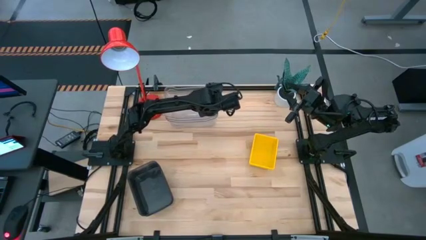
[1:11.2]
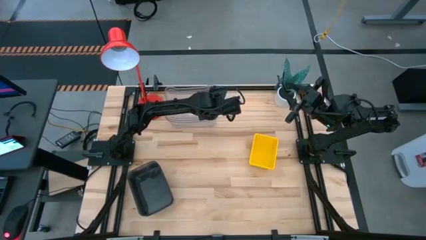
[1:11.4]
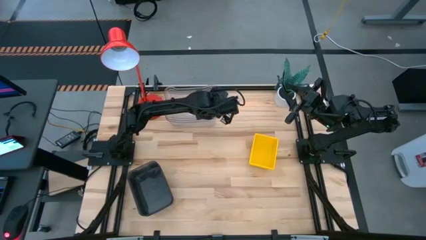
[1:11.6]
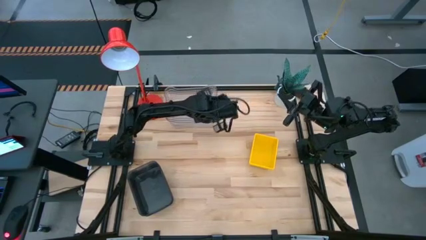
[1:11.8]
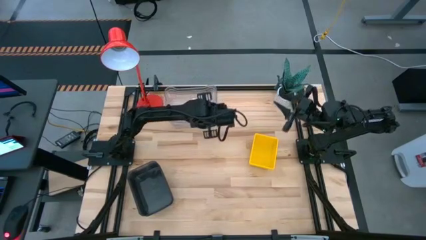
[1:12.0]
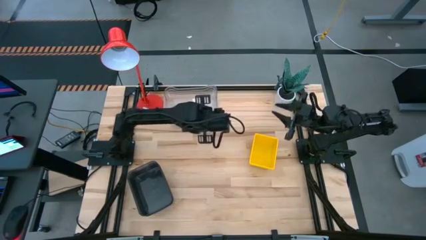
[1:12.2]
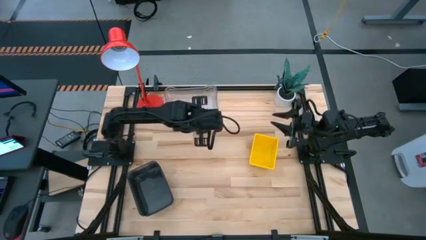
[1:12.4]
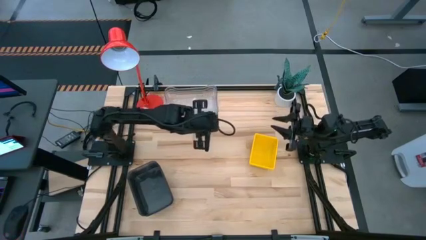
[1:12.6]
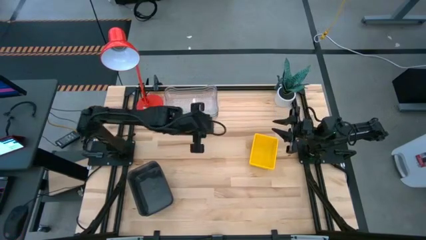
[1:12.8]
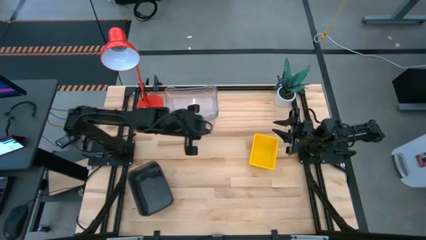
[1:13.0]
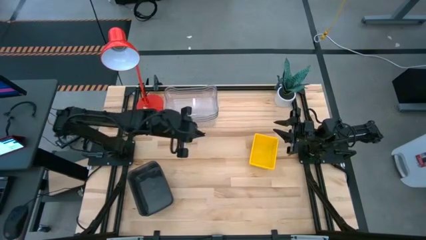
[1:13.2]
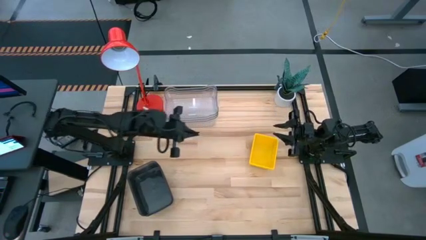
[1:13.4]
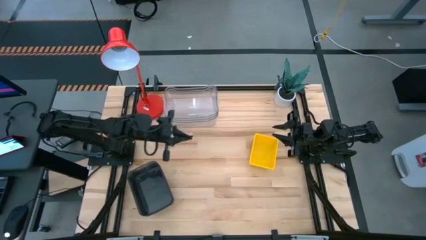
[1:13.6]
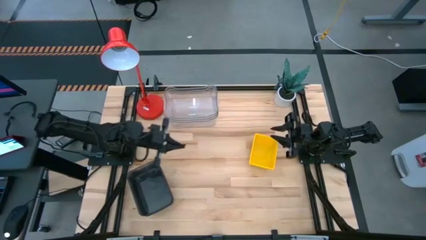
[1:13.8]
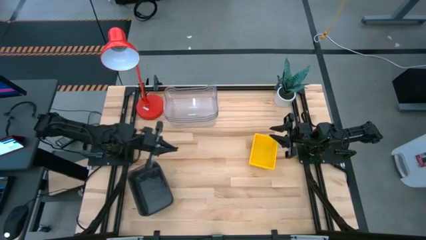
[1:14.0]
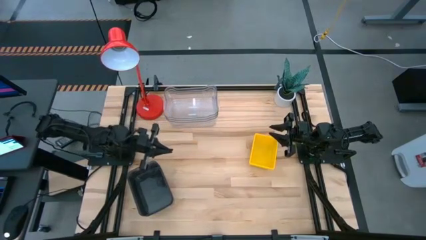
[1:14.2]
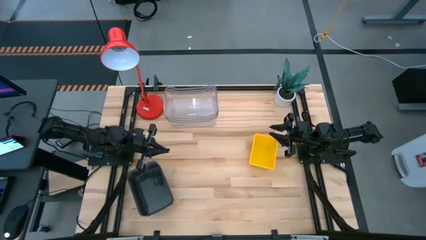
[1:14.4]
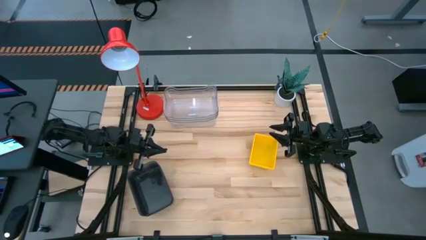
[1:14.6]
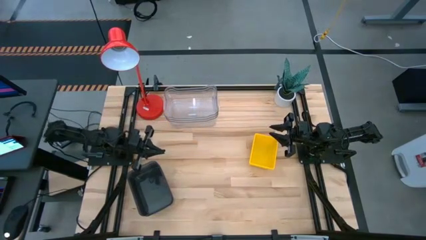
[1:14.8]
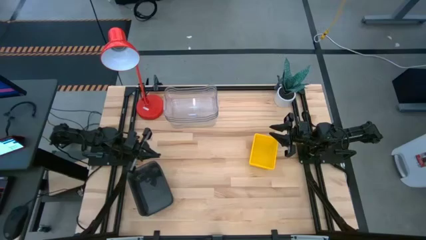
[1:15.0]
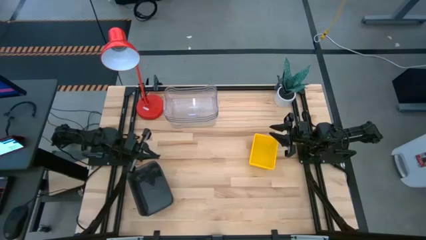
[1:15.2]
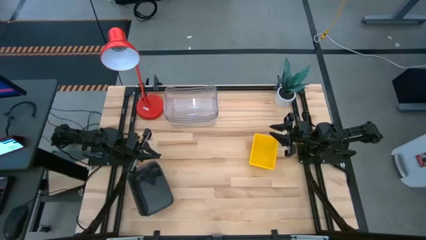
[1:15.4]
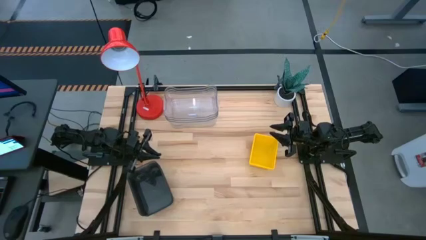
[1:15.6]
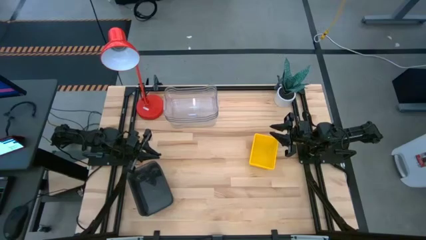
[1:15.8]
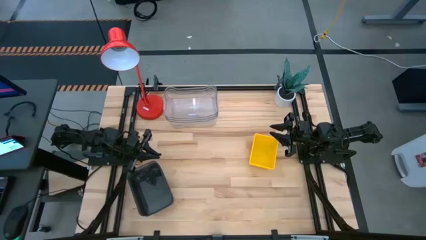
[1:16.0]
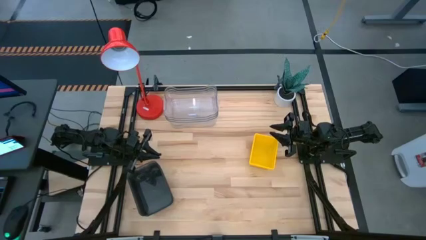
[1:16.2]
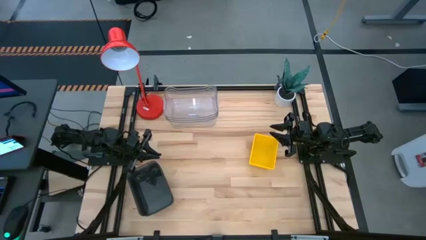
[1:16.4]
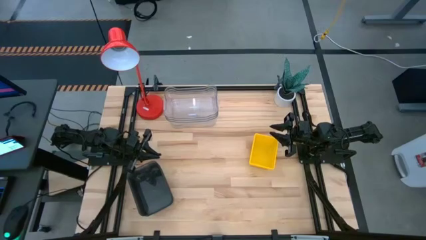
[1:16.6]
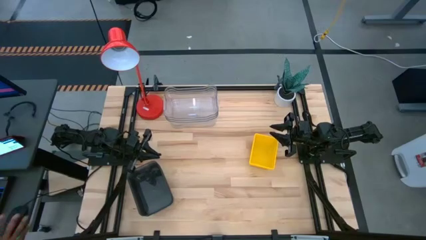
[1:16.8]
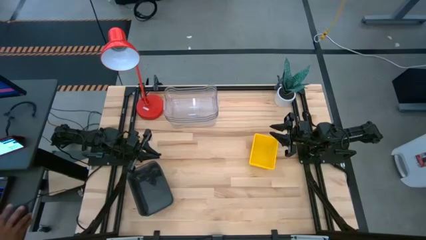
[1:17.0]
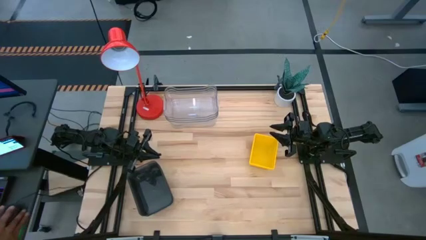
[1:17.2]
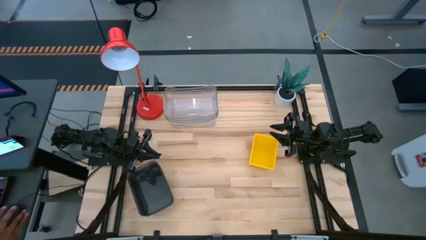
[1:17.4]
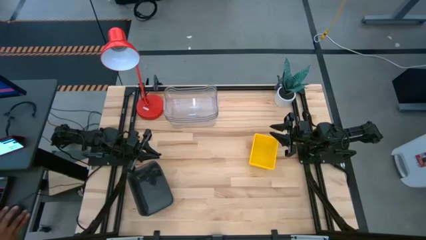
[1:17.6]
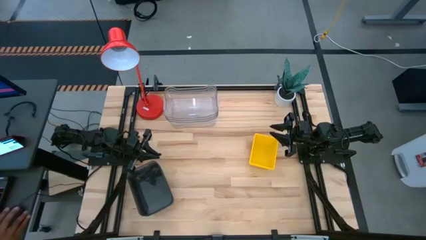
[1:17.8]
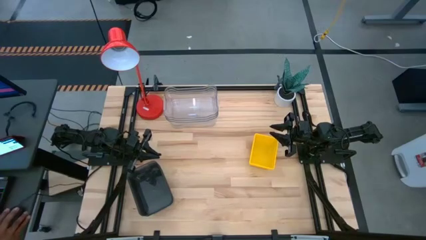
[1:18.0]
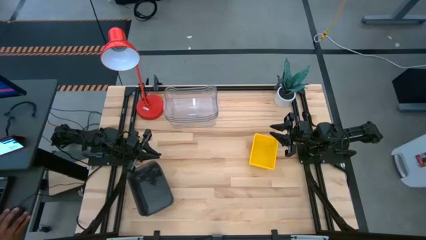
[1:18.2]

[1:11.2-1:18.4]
Return to Home Position

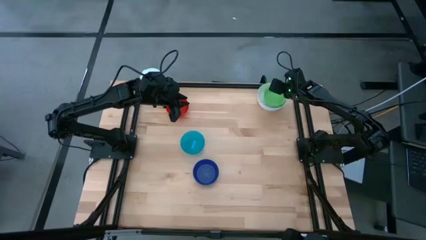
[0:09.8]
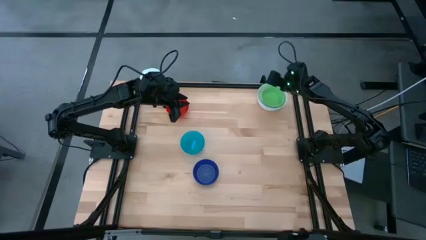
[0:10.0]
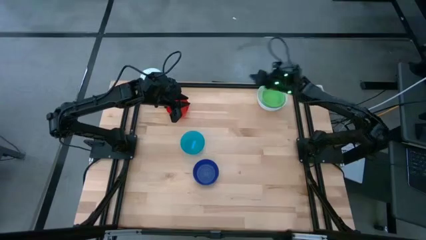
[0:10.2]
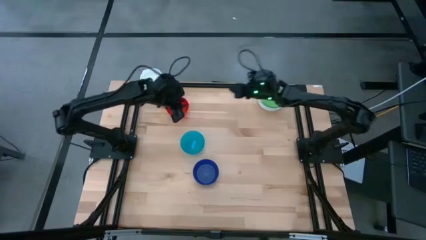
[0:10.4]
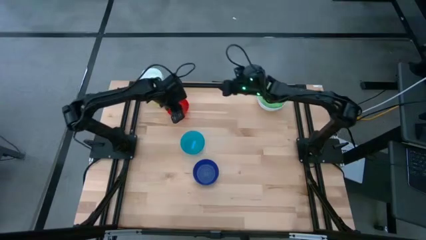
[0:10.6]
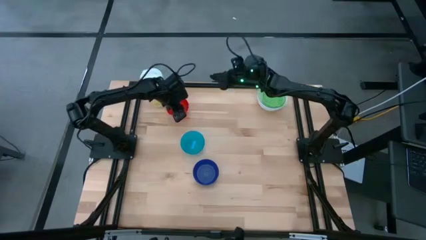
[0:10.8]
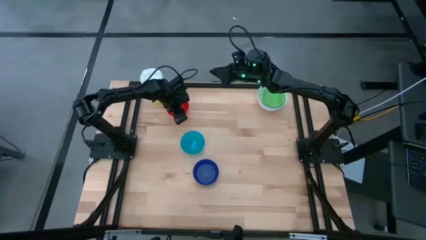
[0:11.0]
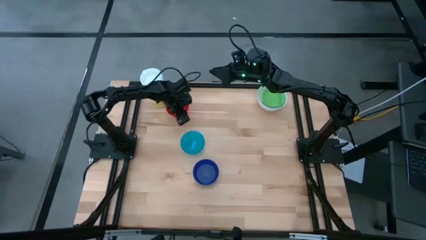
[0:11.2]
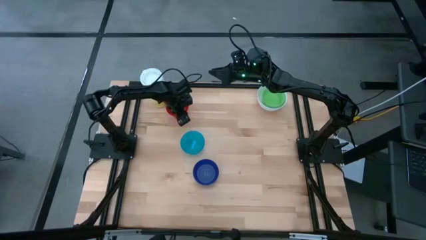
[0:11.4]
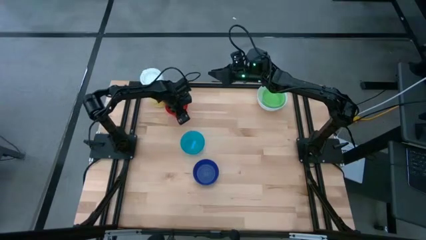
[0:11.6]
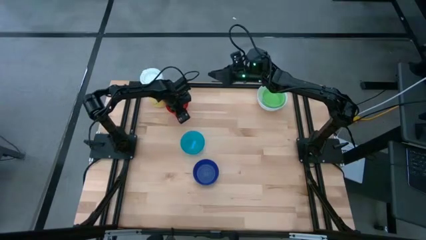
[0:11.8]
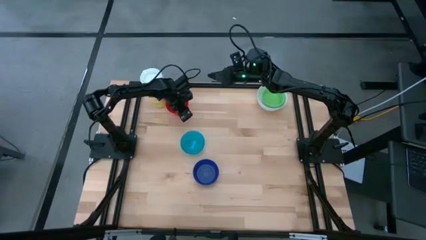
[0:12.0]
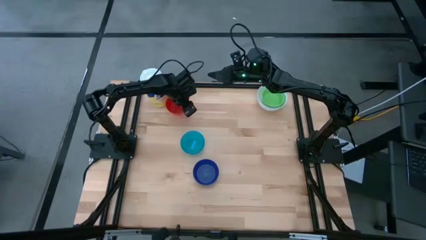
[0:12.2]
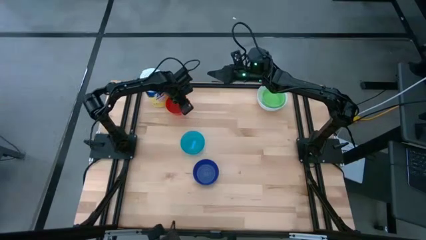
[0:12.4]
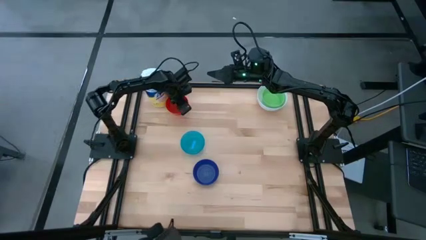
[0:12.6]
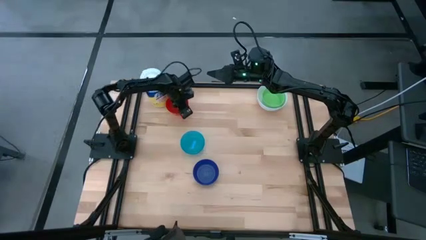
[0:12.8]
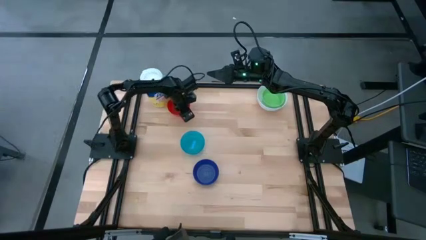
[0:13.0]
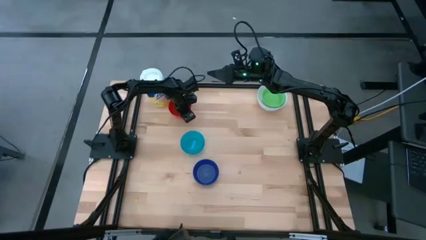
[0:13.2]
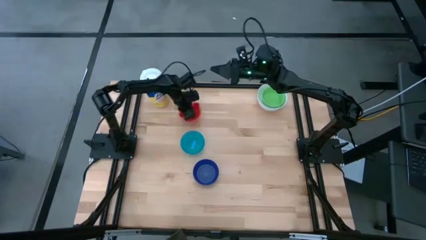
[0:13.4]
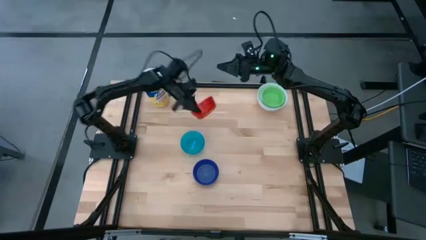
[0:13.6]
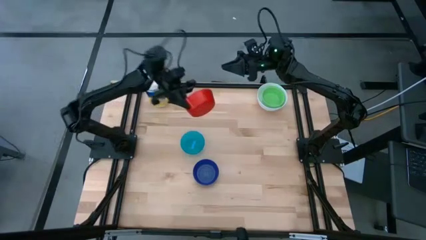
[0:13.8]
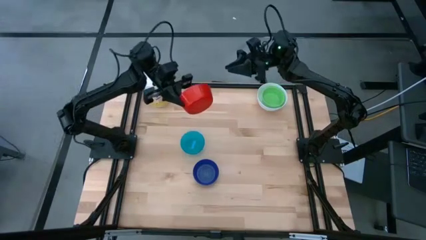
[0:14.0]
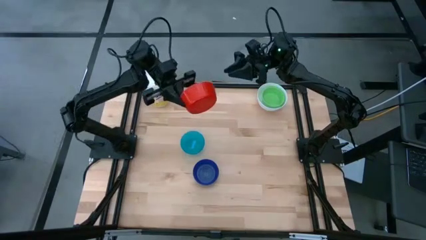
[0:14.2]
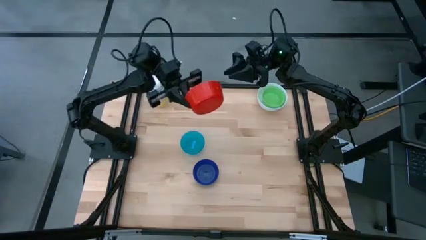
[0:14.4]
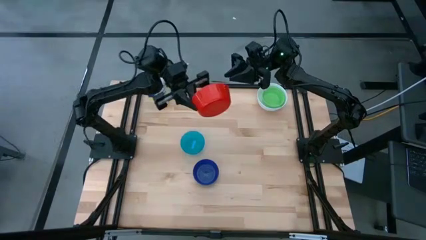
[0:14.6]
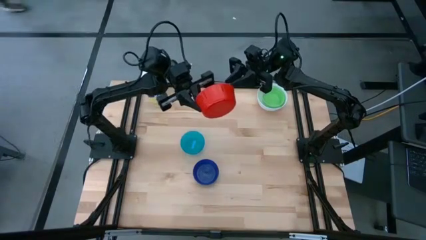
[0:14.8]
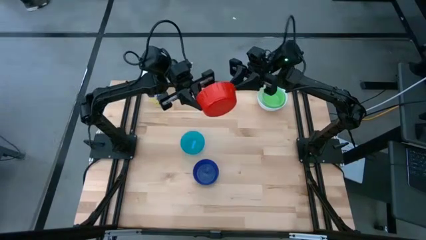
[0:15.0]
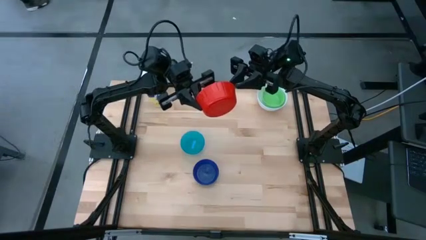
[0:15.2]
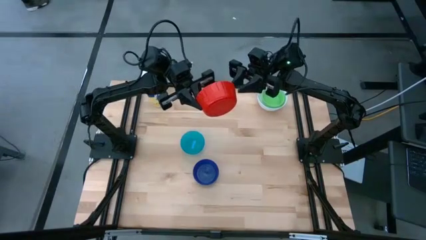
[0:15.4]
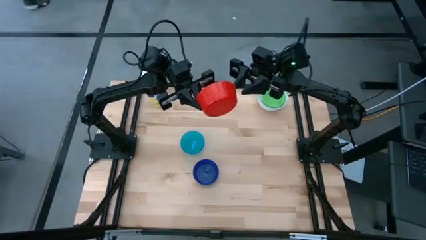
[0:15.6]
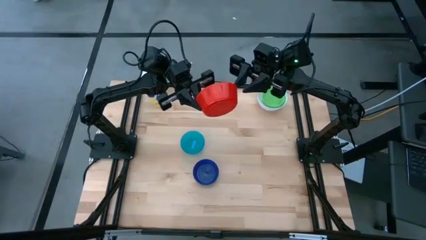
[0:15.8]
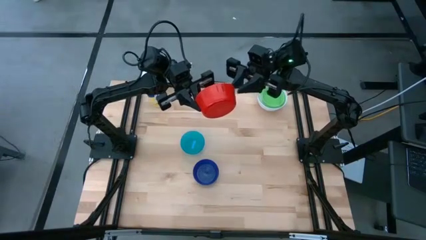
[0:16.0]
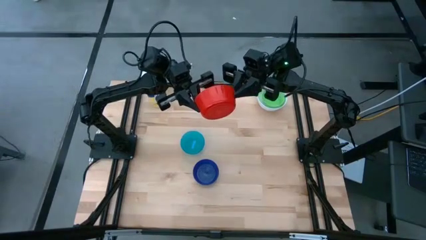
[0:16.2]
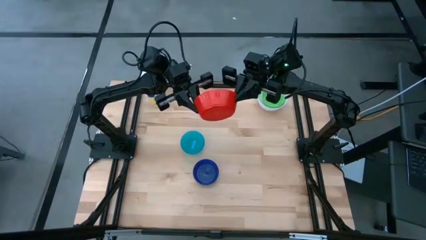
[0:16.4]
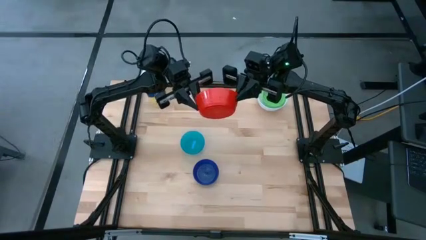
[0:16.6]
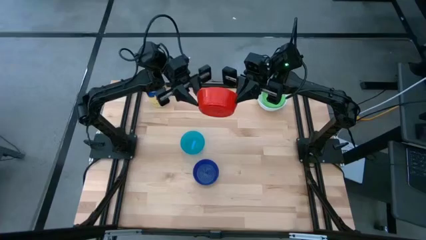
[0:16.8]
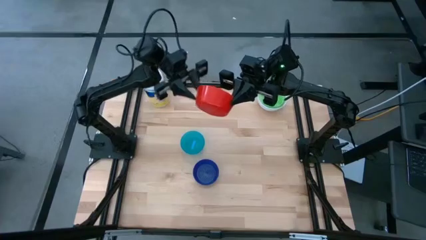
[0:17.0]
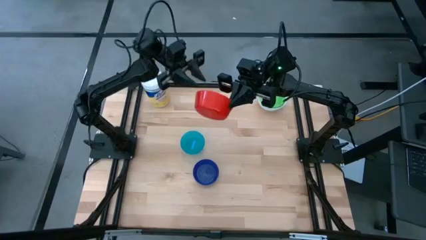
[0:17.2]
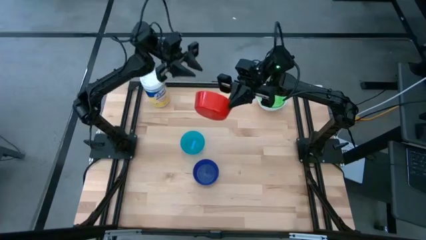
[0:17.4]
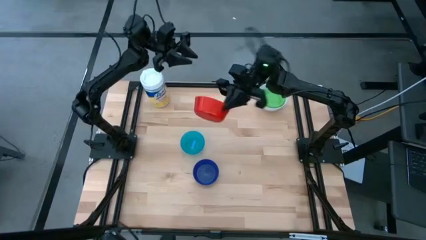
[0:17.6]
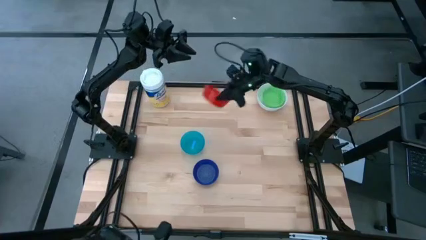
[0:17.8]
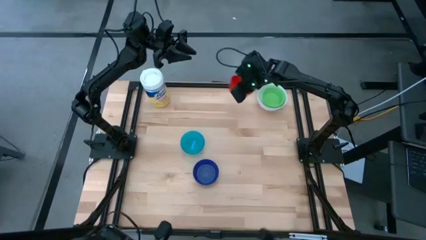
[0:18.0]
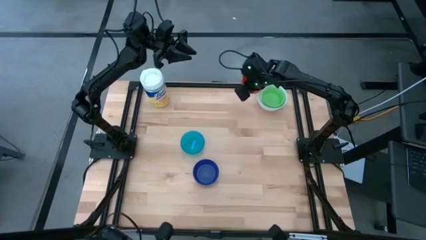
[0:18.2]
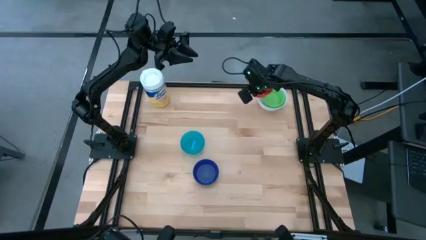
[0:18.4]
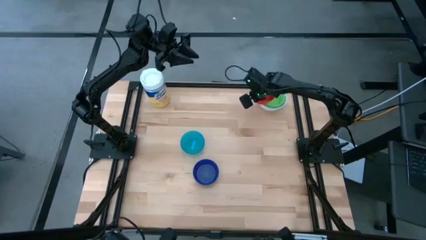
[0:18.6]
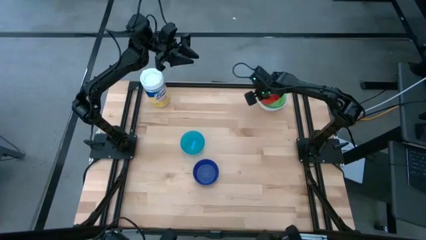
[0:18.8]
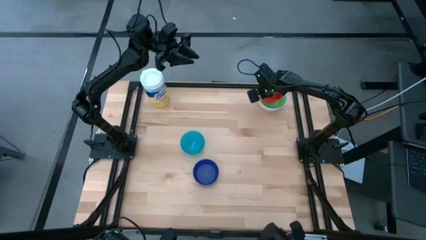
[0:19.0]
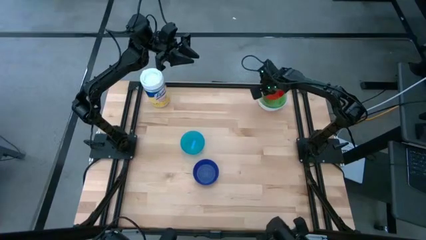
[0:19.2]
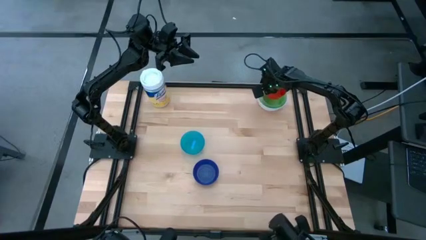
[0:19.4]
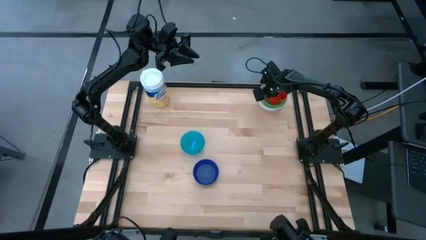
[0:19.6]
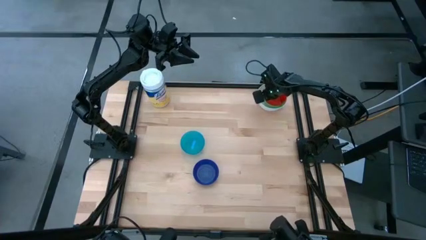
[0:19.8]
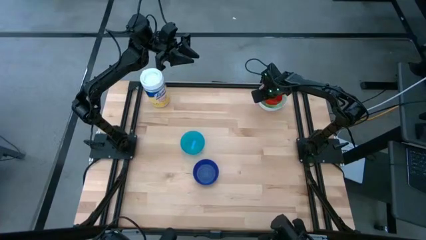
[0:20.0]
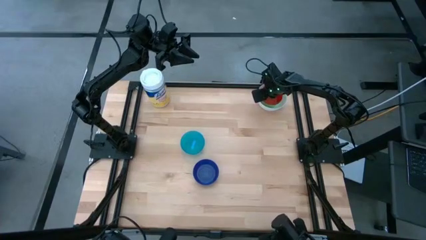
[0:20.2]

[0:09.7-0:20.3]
Stack the red bowl on the green bowl
